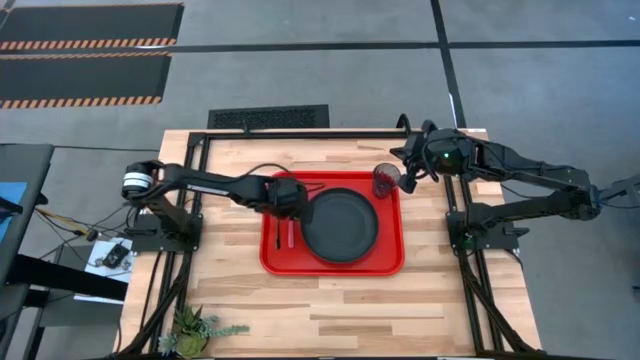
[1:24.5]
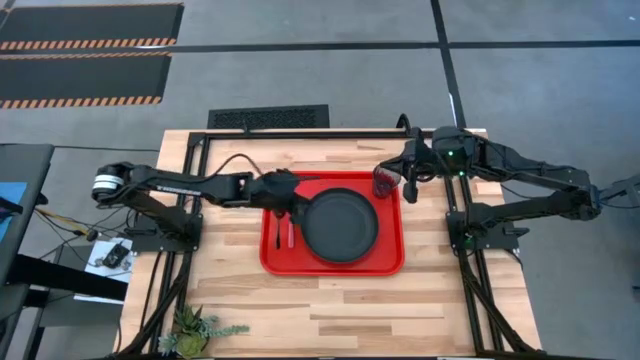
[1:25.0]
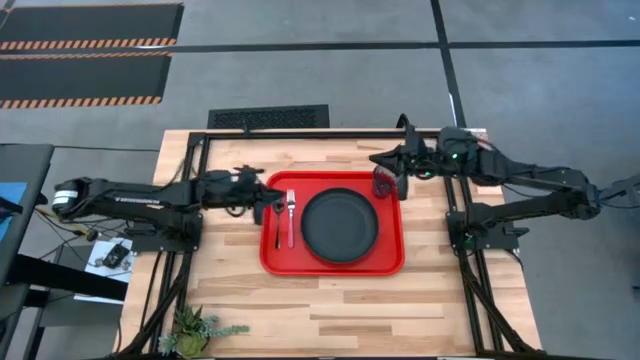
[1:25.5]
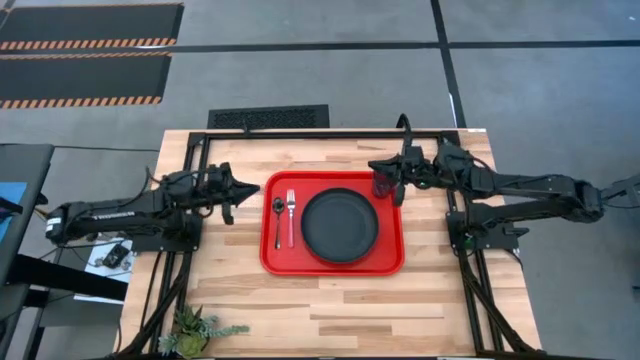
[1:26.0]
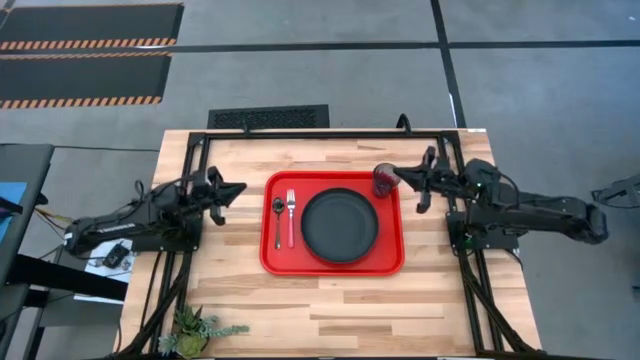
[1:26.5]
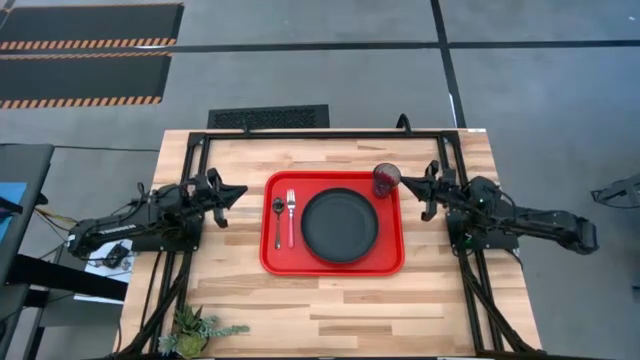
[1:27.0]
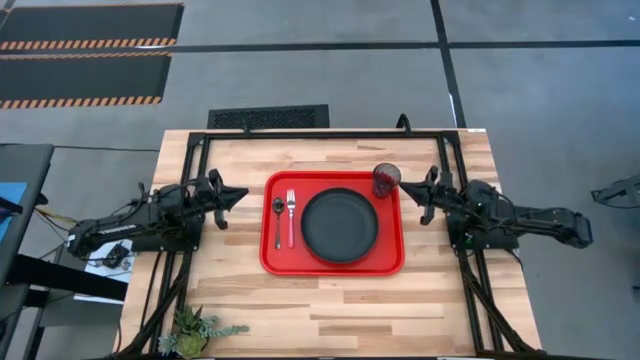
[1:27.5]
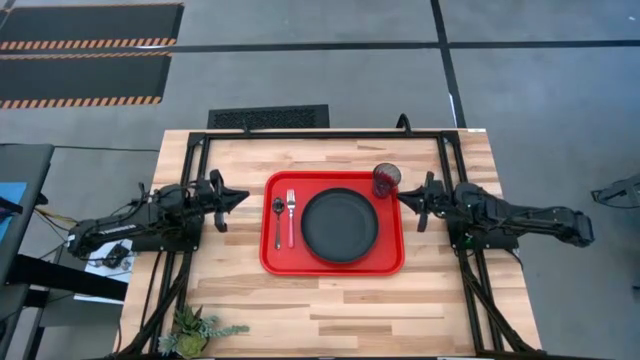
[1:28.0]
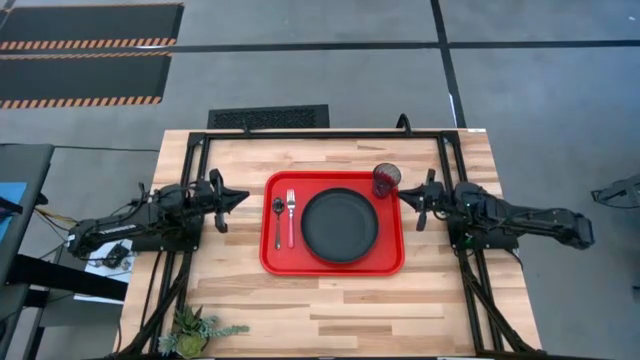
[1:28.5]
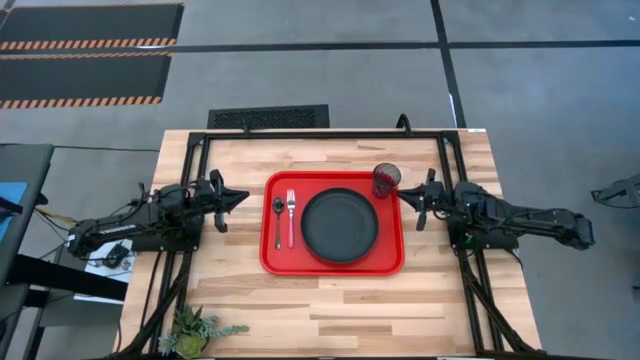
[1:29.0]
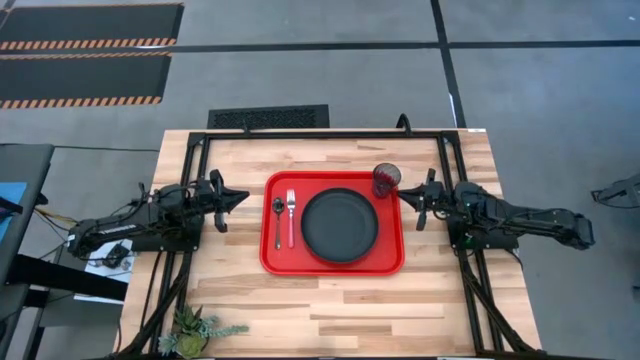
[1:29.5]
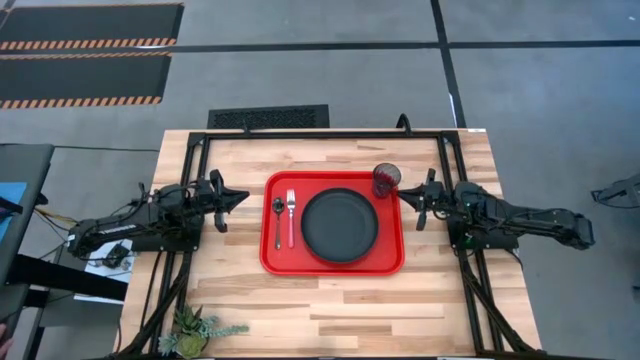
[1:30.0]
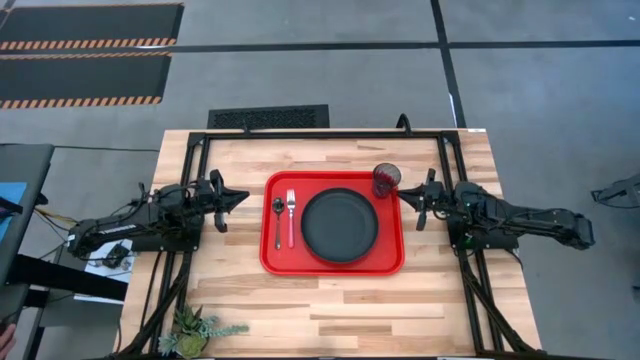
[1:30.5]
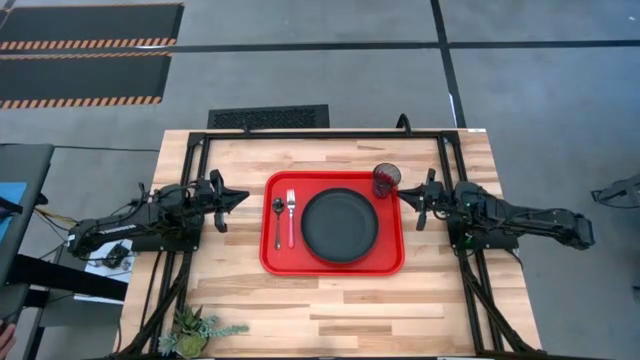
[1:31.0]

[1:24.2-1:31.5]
Task: Pick and place plate/cup/fork/spoon on tray
Return to Home Position
